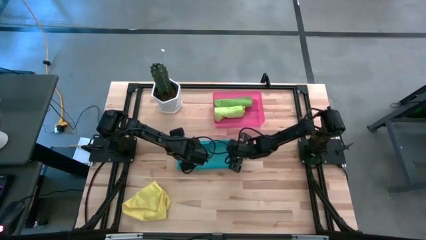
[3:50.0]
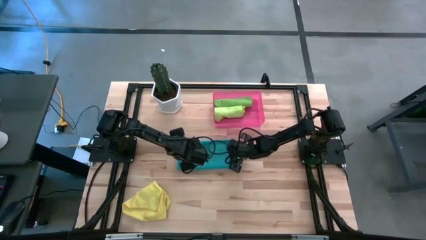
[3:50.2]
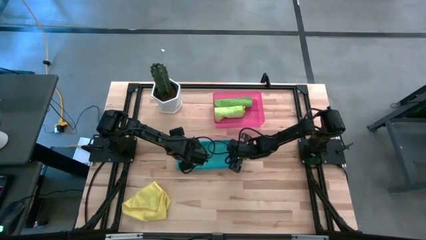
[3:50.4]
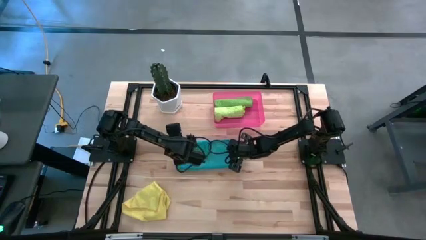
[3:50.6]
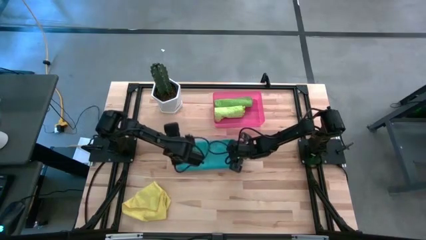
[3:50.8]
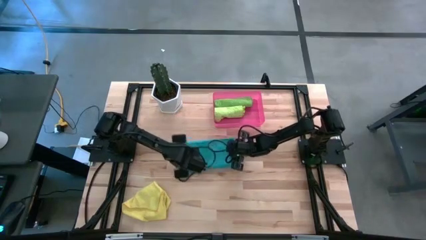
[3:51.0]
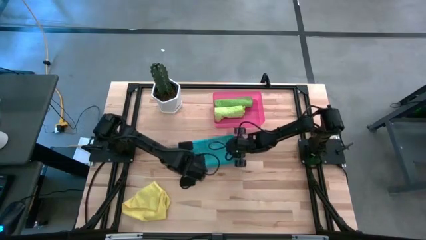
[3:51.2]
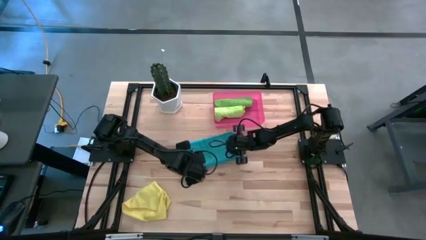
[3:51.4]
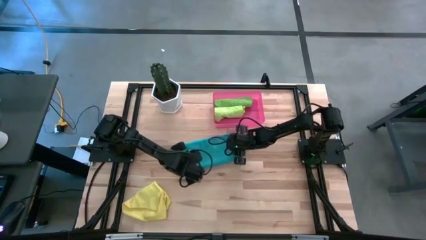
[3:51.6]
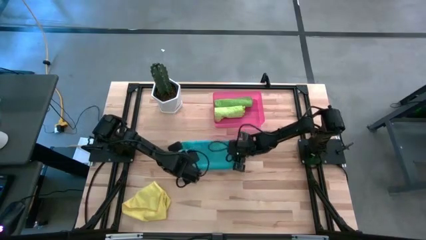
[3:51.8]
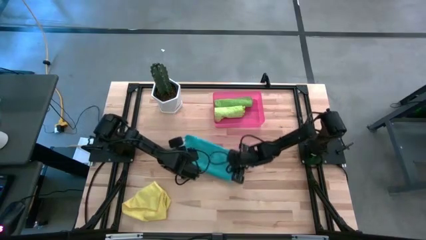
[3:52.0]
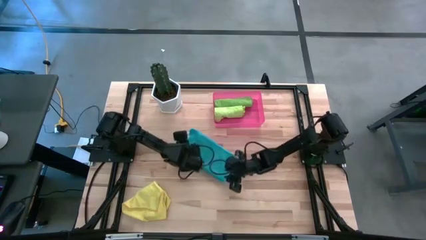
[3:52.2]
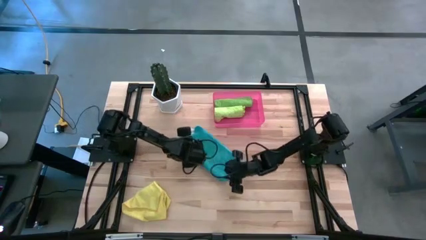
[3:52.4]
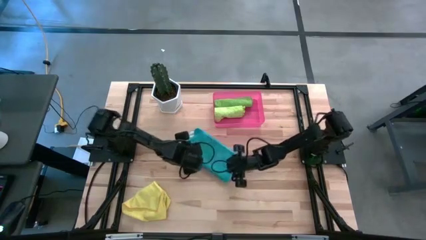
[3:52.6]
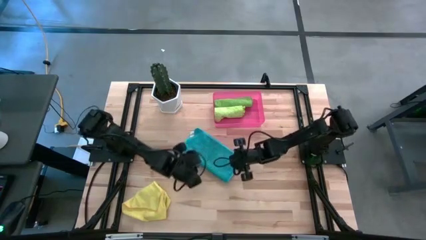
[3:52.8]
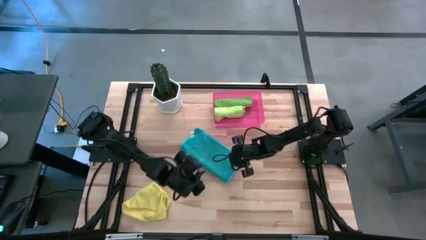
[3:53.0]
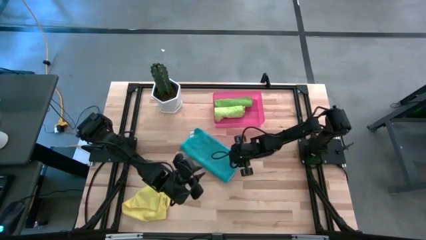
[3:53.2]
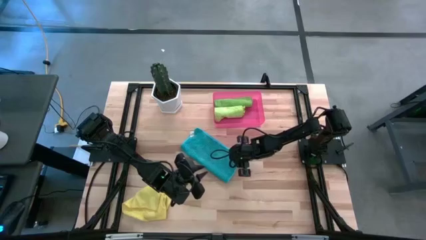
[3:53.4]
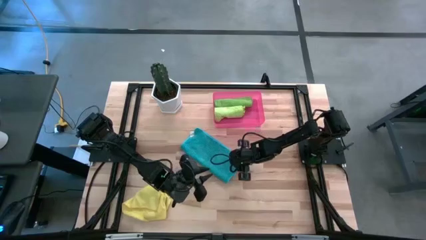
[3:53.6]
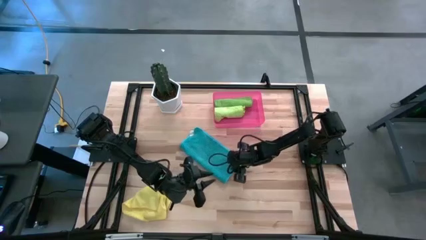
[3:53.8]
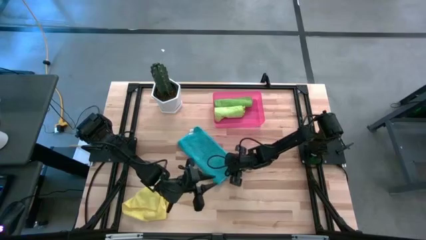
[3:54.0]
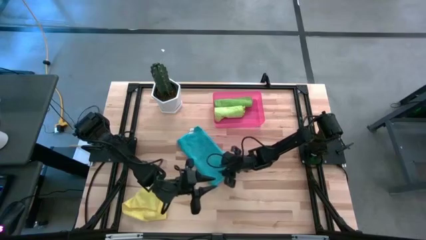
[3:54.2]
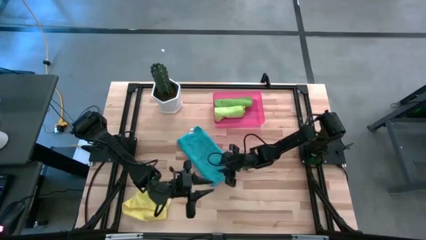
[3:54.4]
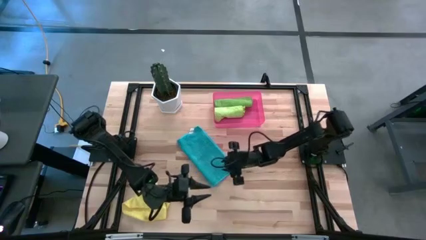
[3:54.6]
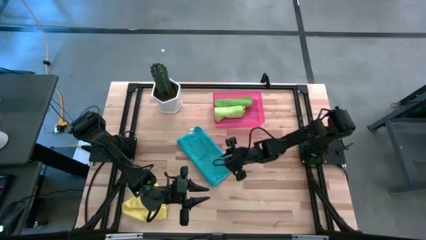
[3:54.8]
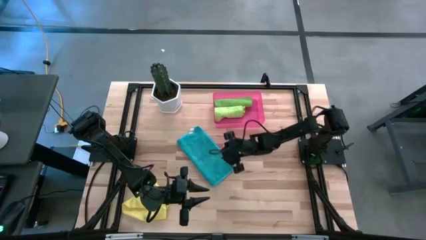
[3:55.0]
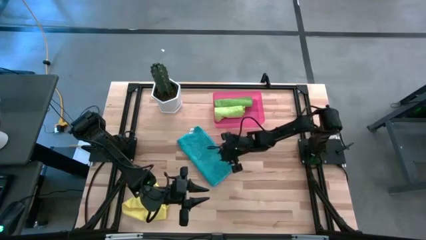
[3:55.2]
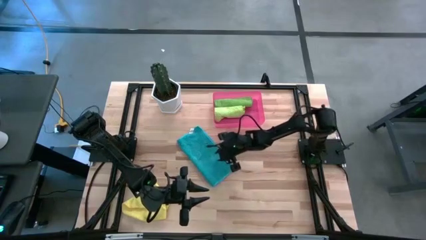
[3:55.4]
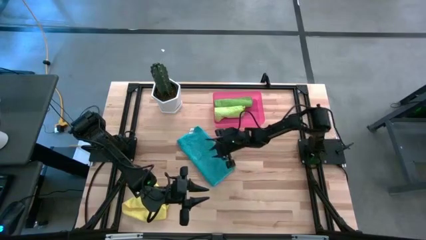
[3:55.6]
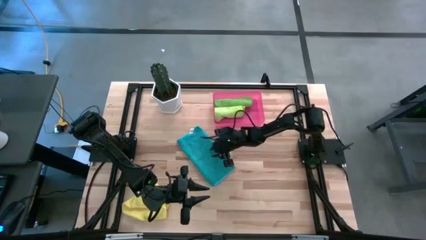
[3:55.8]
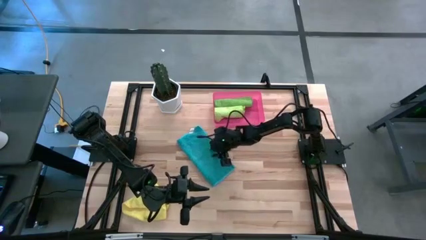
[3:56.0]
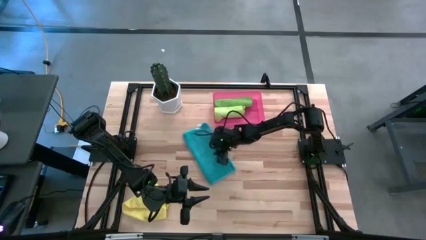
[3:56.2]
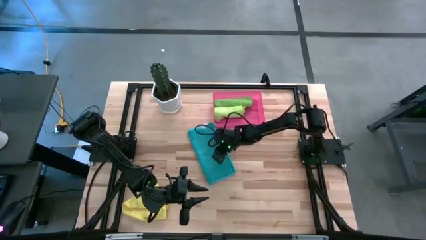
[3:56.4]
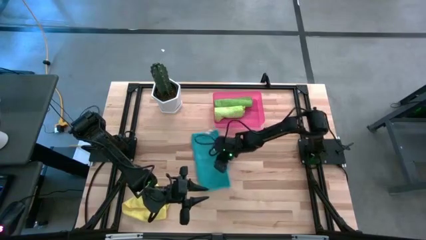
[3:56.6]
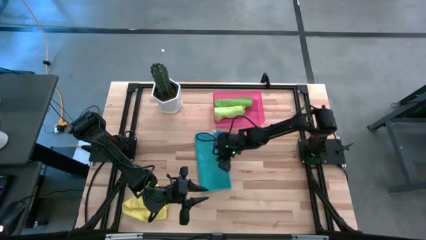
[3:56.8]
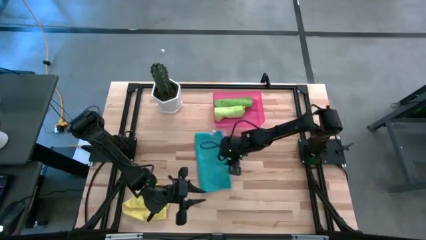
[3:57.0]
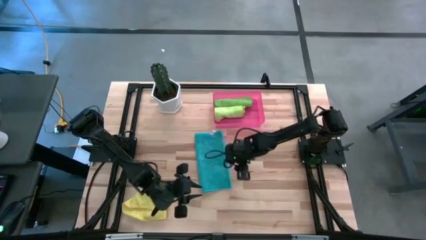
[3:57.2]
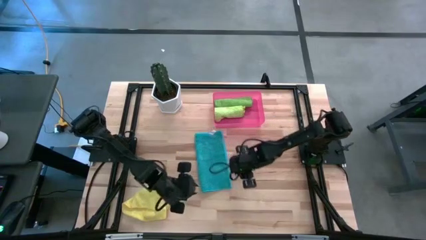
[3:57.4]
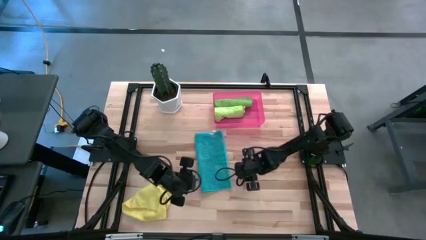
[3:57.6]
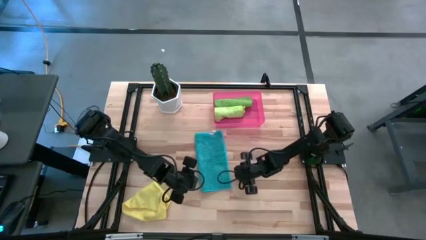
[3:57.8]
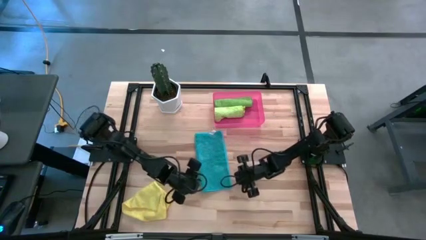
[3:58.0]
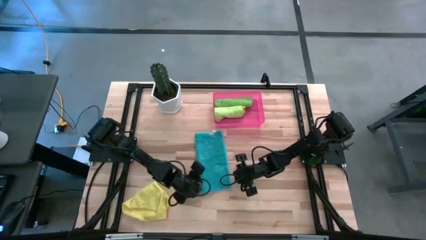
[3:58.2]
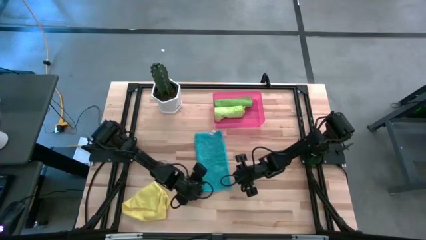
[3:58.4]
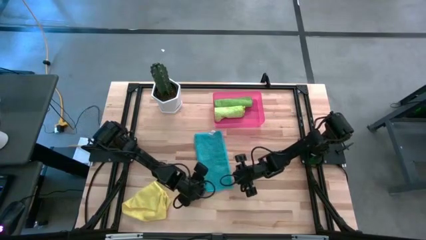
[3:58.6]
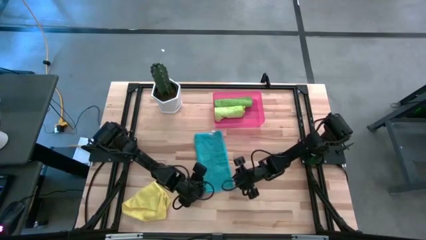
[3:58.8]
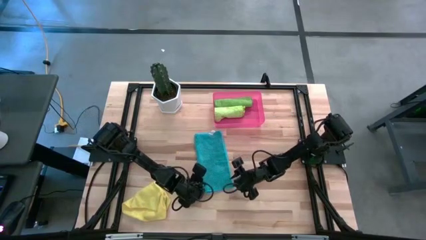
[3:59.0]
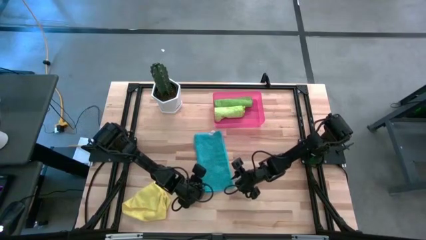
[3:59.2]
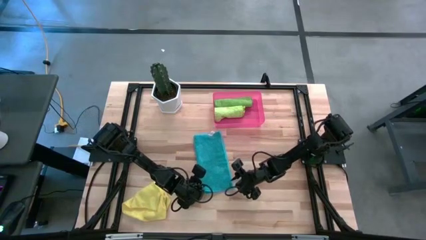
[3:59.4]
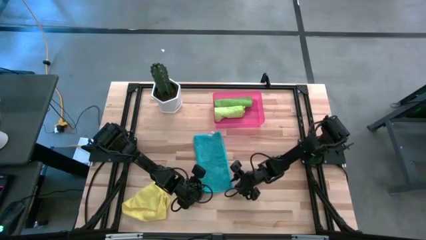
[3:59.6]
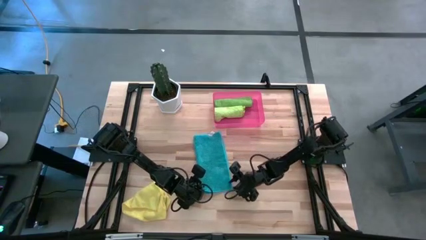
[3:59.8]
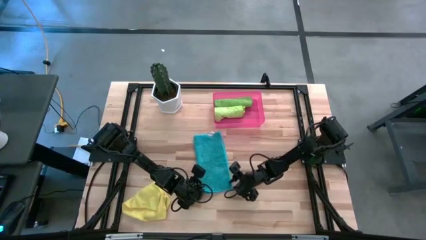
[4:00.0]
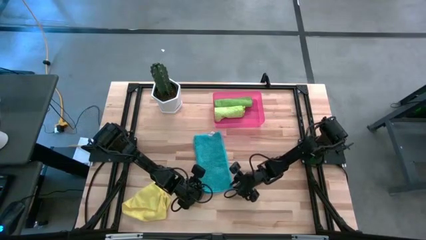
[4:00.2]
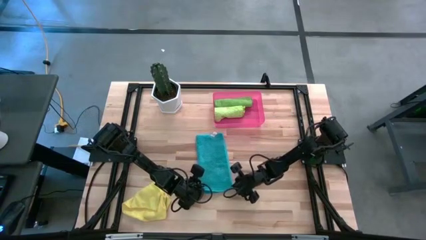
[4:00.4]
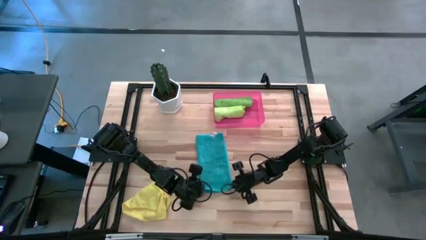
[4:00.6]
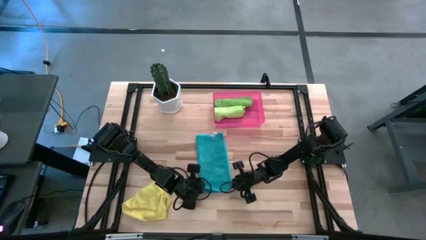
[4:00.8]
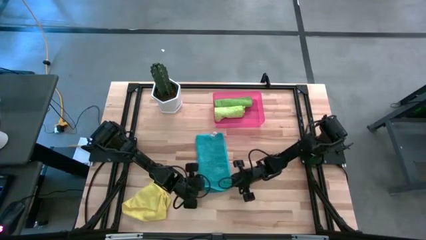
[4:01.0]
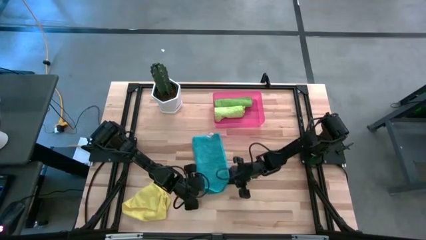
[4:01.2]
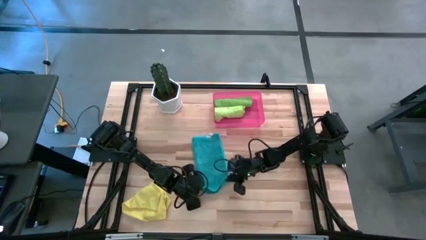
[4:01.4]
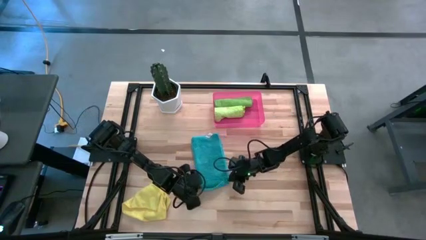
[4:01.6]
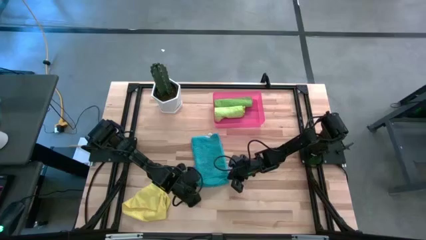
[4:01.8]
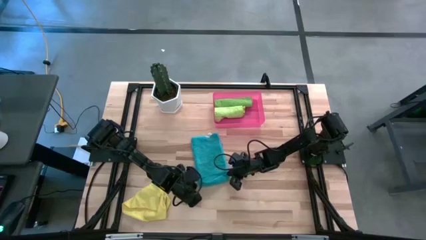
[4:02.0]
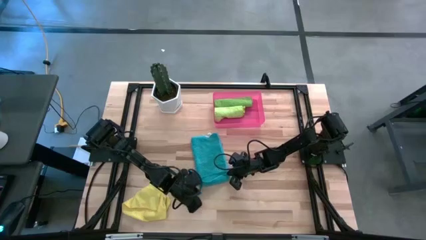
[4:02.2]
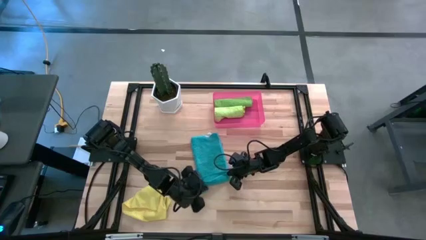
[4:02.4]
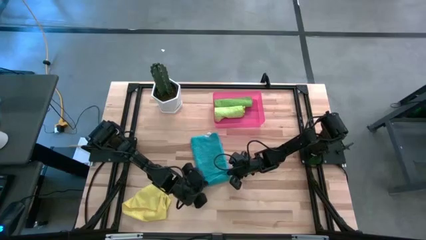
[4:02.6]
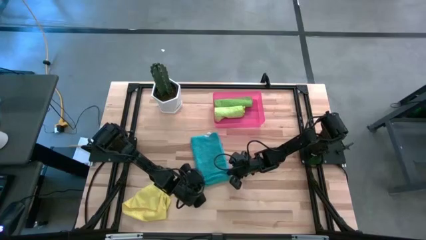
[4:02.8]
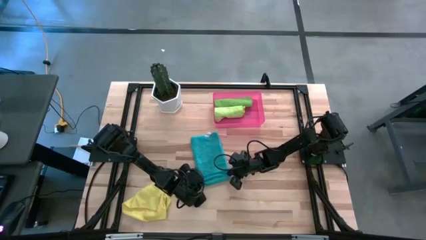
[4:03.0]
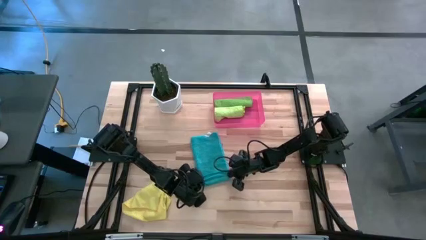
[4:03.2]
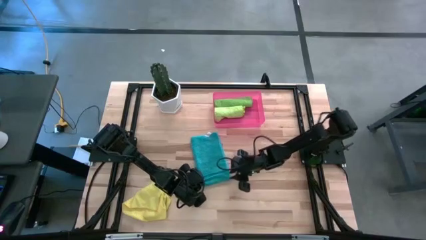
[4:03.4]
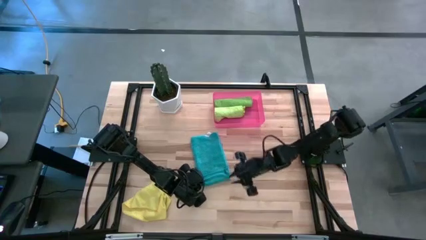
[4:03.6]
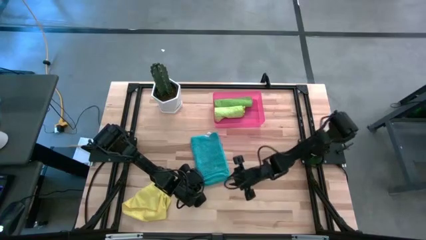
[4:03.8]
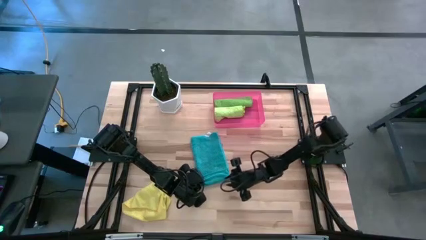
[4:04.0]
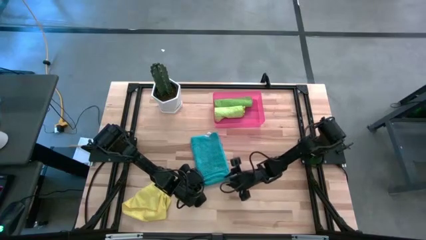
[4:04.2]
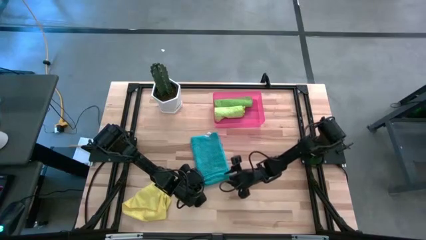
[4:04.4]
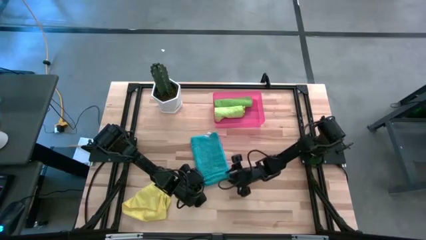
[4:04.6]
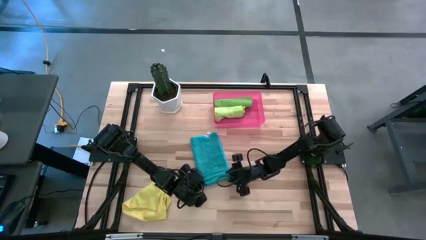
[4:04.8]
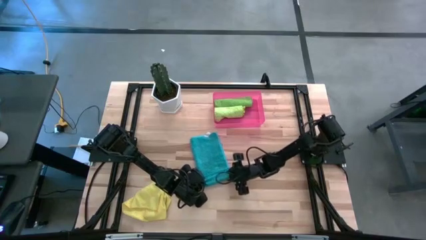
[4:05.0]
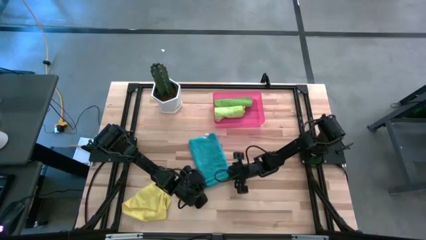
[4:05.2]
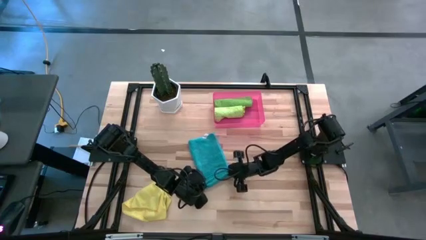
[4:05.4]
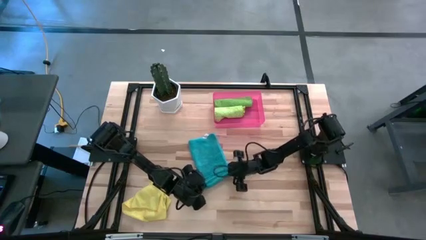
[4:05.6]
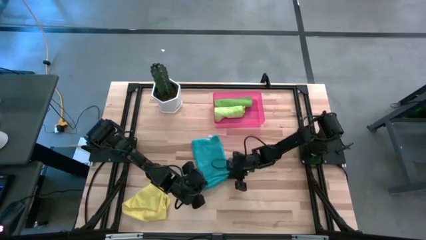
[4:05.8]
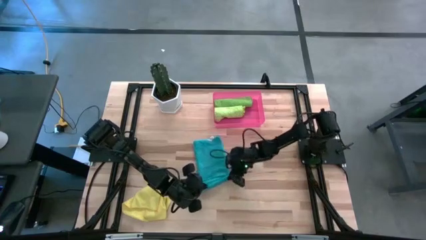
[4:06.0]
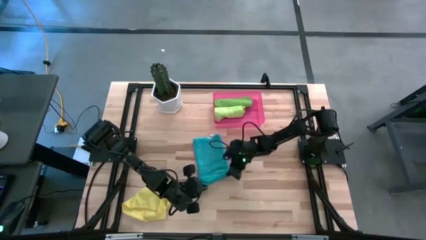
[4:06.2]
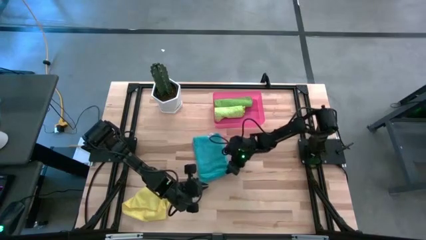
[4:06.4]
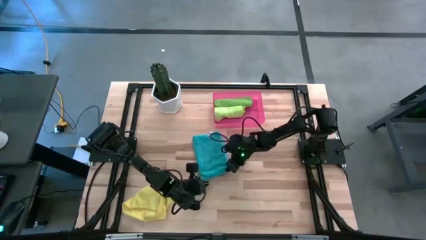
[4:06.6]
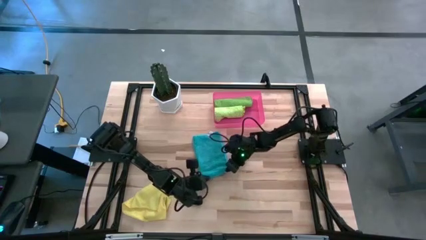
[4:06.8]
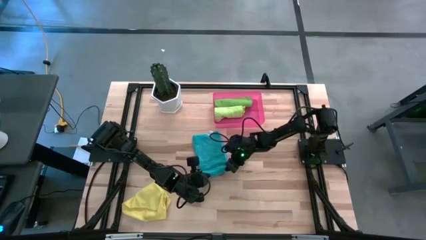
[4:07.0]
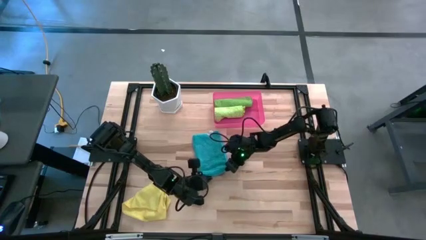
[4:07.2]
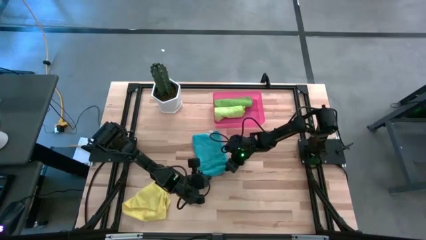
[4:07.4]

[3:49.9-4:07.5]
Task: Roll microfiber towels into tight, uniform cylinder then place into a basket
Roll the blue microfiber cloth
